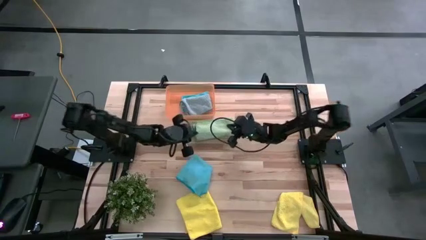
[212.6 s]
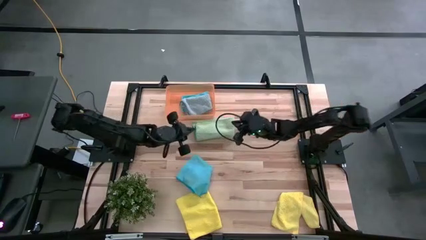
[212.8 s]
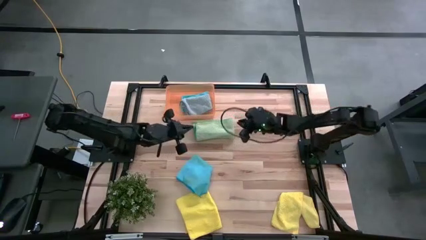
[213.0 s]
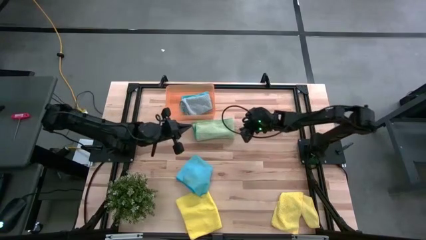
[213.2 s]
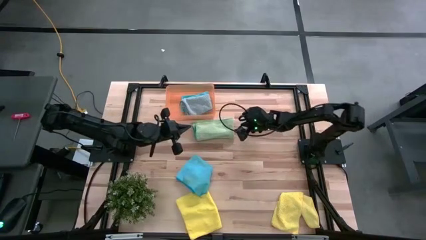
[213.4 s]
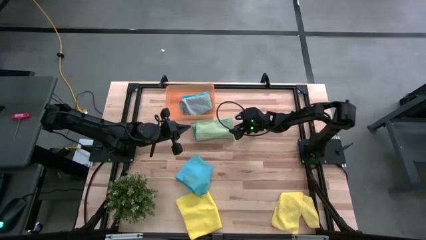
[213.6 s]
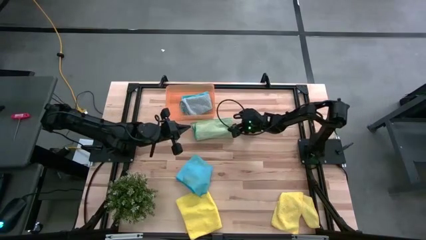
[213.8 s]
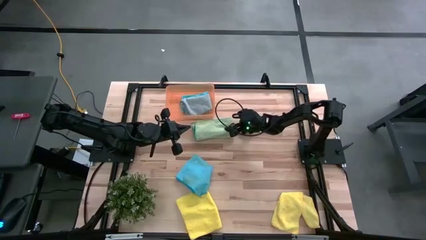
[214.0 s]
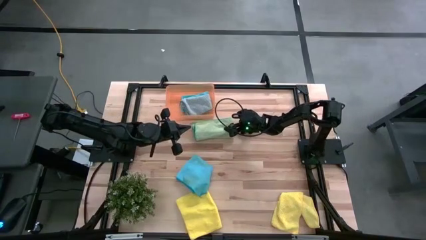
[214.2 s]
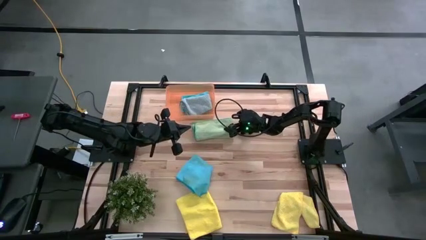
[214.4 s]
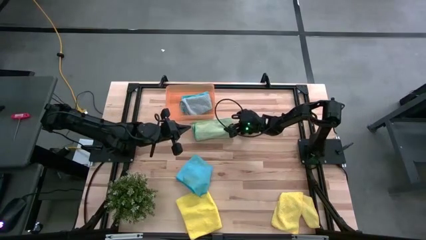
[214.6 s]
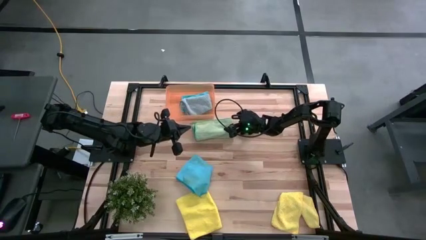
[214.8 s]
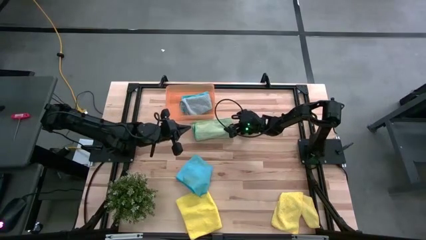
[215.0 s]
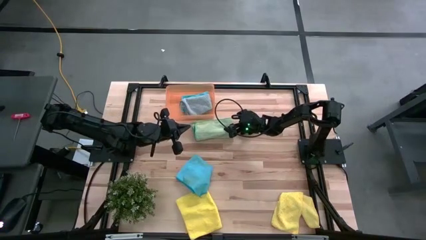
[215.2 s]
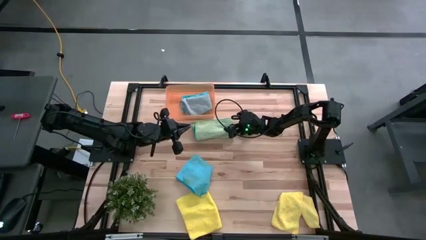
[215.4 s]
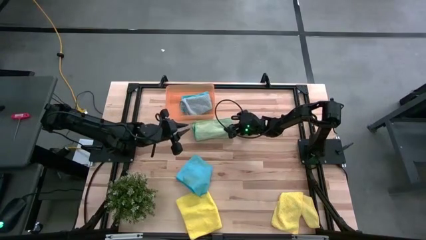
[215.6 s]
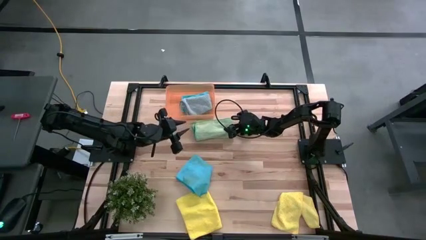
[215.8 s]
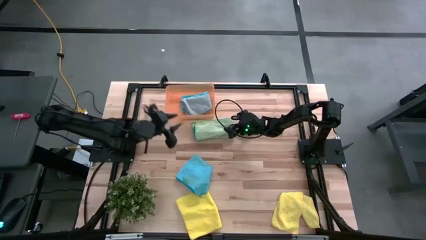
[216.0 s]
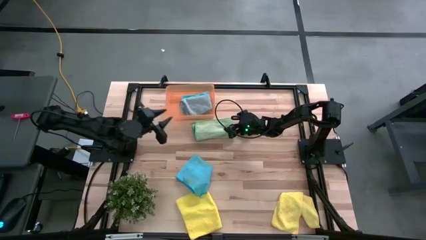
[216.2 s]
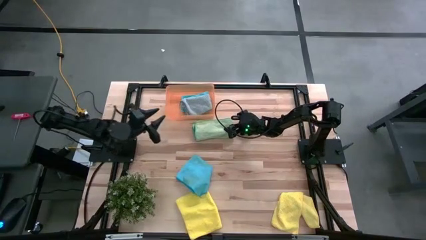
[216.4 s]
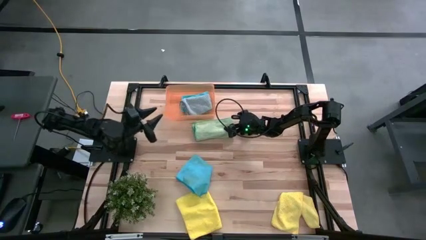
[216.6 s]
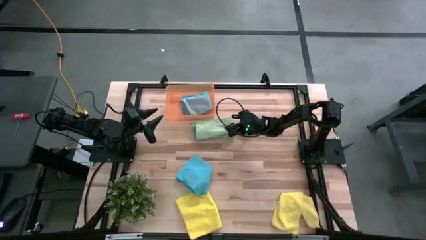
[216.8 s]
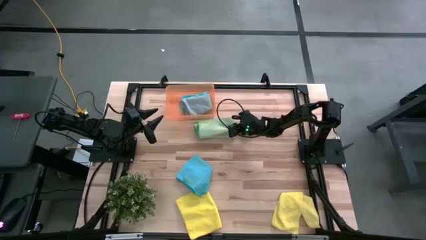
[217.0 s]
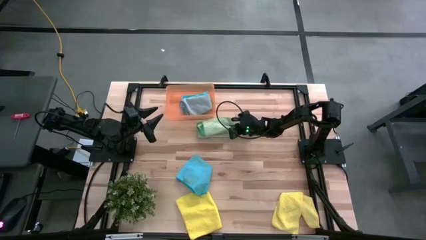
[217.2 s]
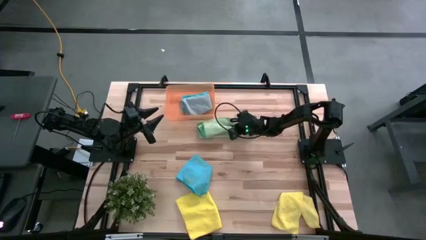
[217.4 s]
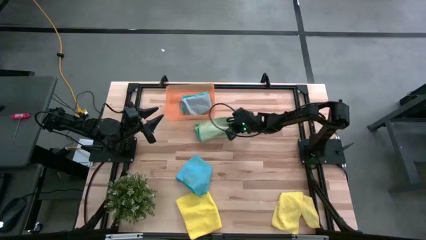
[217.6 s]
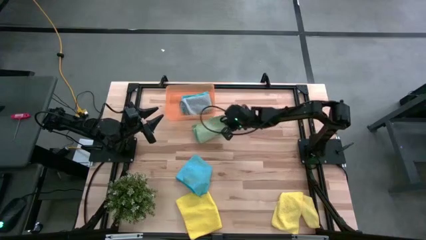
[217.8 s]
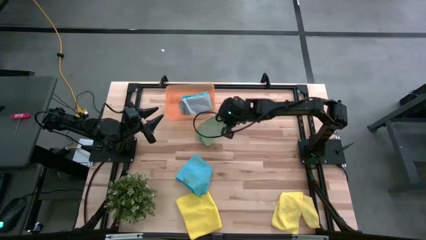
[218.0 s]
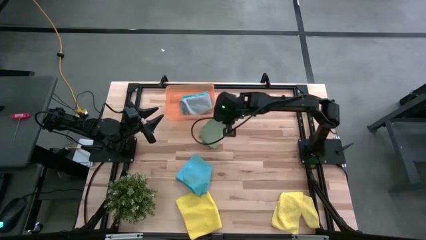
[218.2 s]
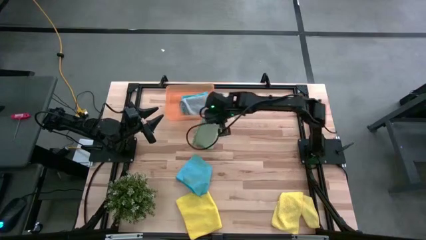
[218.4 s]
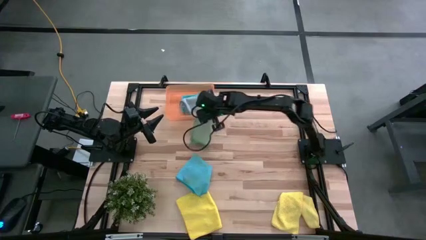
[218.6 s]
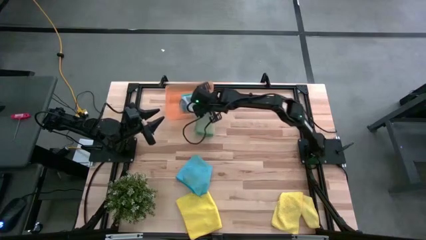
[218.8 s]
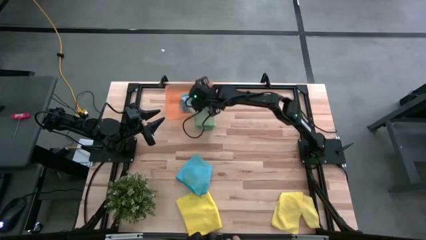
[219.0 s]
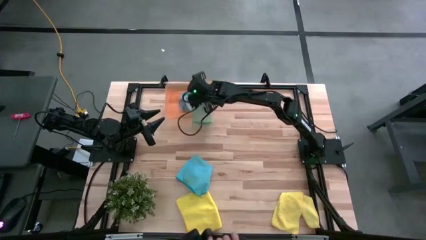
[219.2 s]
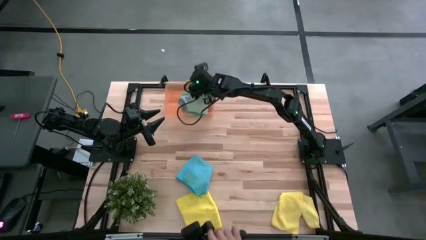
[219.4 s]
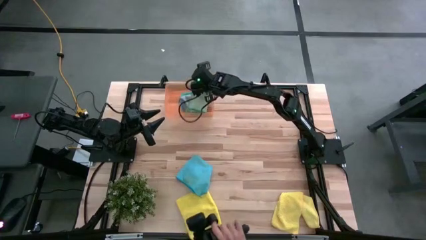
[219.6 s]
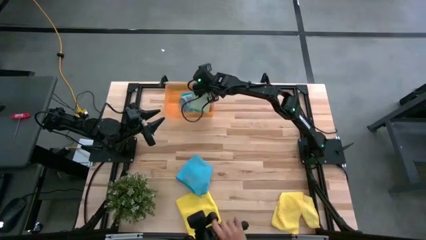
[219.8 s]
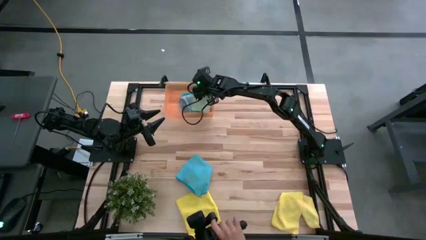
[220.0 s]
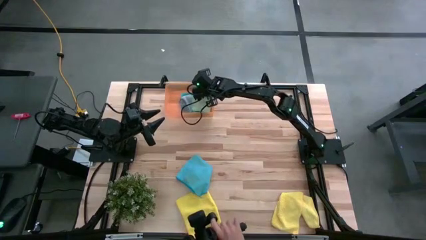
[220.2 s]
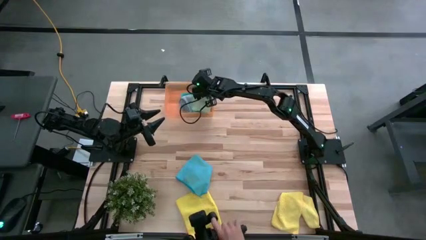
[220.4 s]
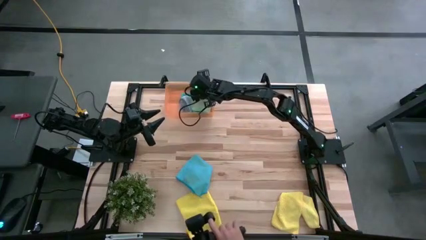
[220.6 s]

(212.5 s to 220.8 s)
Task: Fold microfiber towels
Put the green microfiber cloth into the orange bin

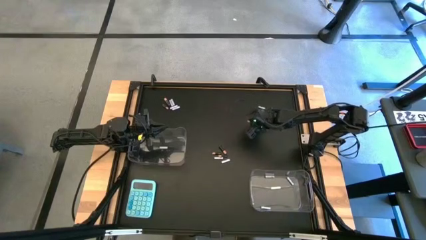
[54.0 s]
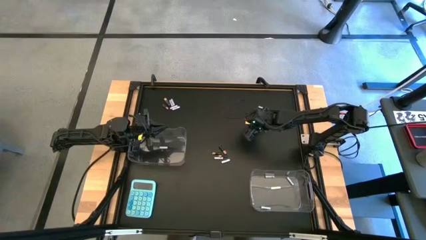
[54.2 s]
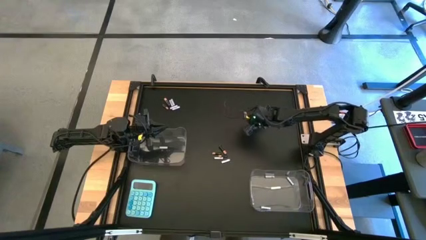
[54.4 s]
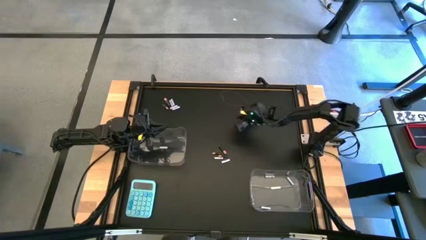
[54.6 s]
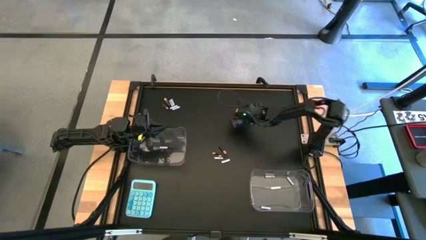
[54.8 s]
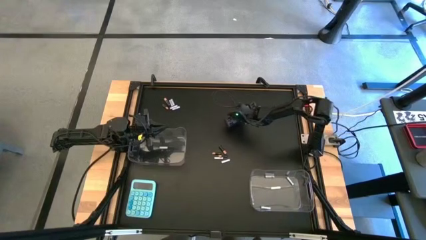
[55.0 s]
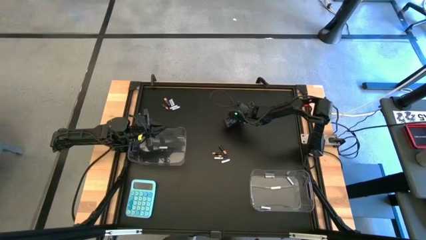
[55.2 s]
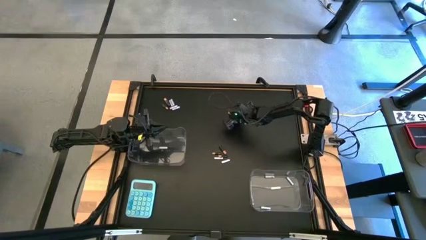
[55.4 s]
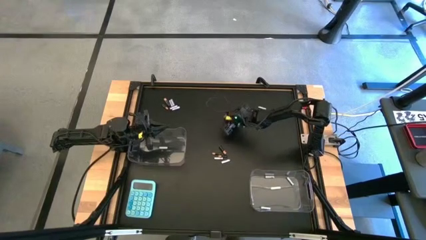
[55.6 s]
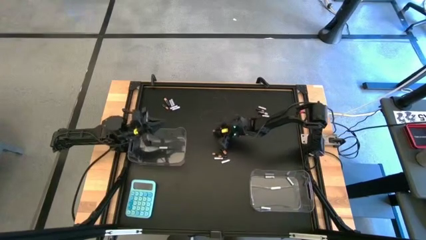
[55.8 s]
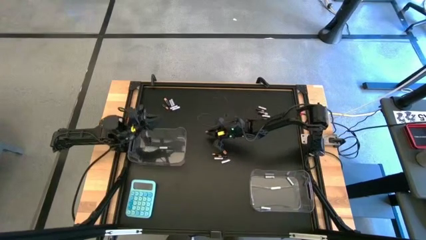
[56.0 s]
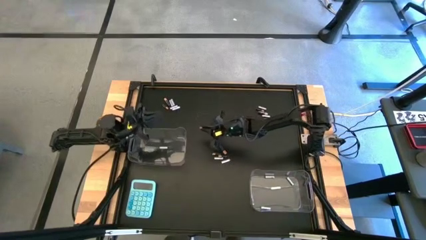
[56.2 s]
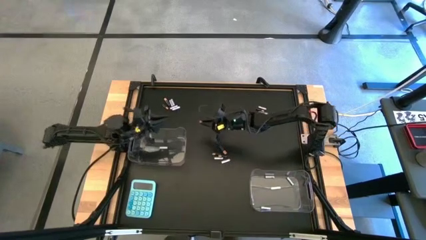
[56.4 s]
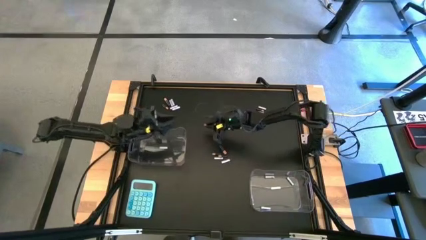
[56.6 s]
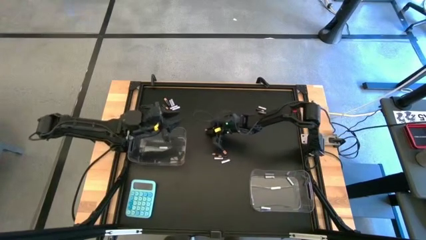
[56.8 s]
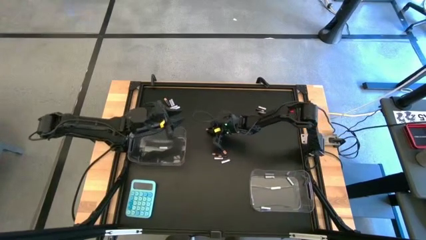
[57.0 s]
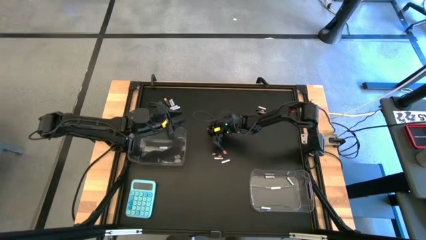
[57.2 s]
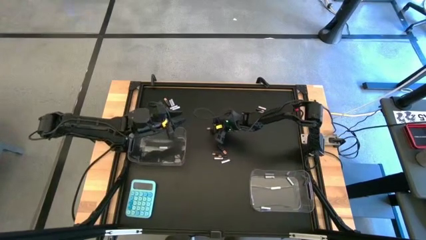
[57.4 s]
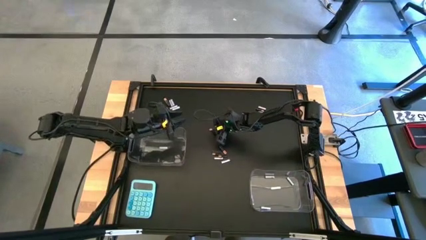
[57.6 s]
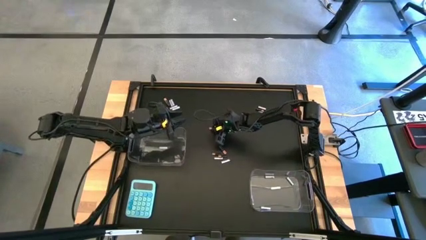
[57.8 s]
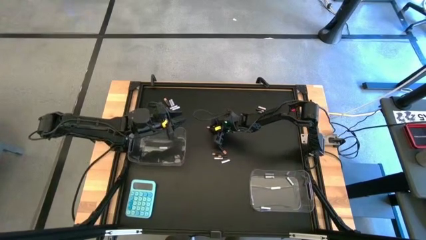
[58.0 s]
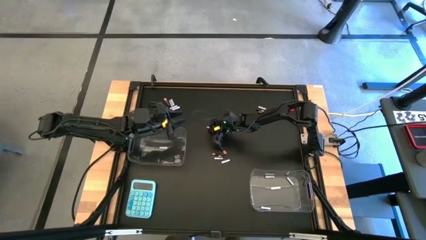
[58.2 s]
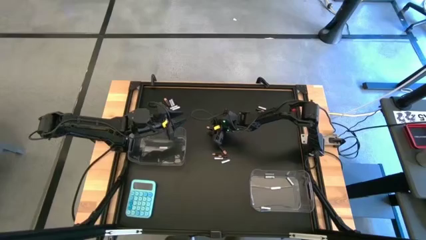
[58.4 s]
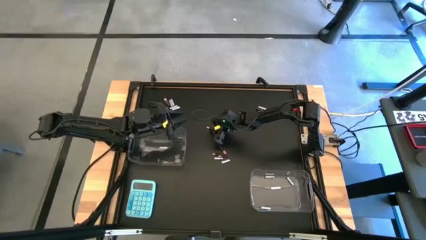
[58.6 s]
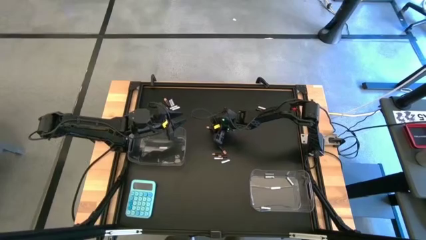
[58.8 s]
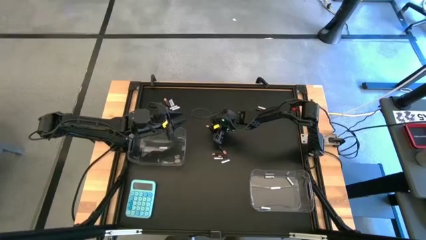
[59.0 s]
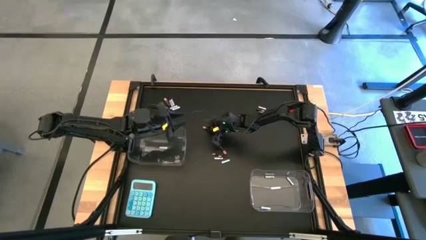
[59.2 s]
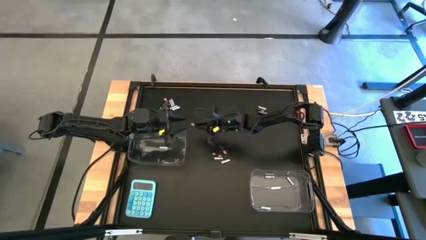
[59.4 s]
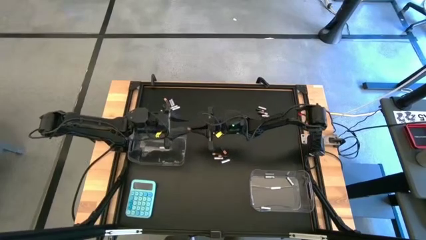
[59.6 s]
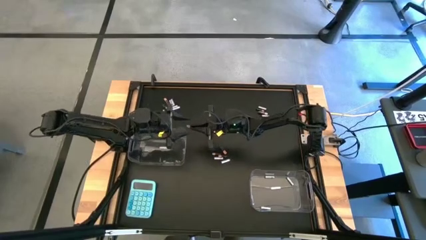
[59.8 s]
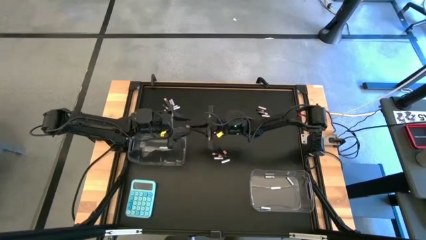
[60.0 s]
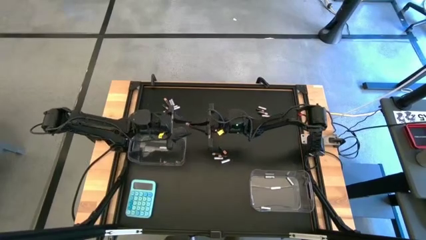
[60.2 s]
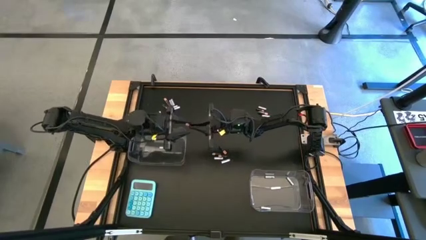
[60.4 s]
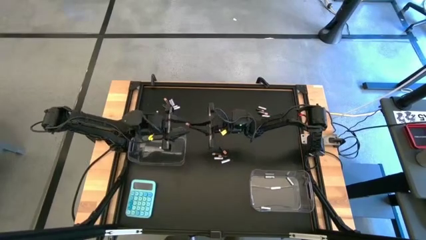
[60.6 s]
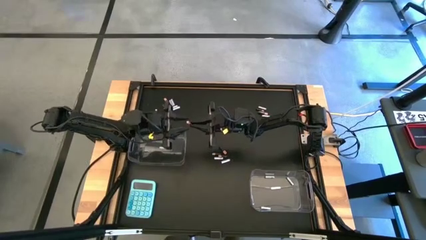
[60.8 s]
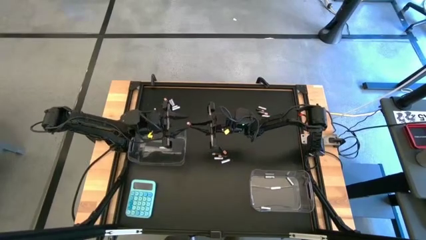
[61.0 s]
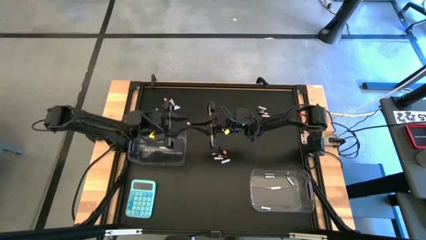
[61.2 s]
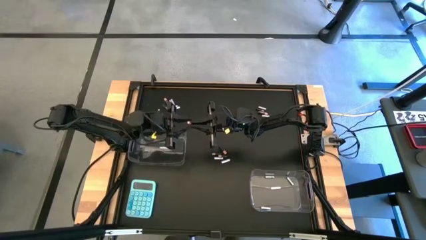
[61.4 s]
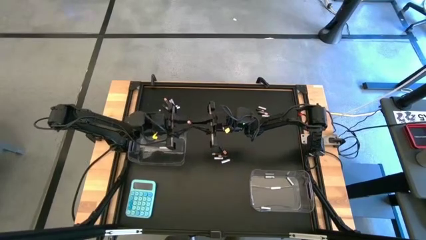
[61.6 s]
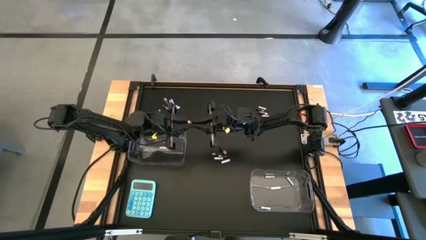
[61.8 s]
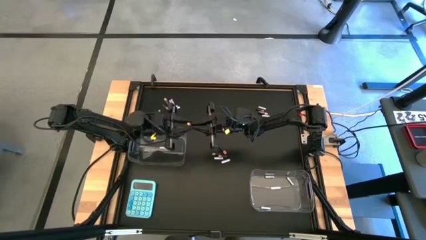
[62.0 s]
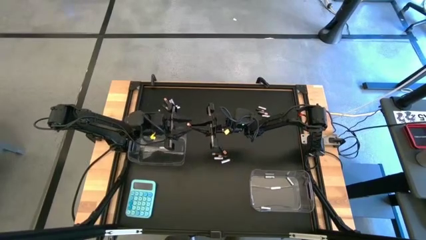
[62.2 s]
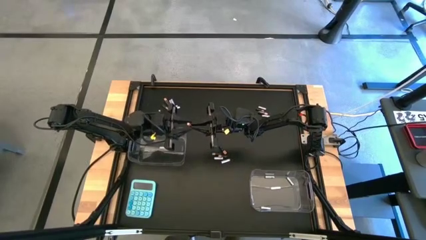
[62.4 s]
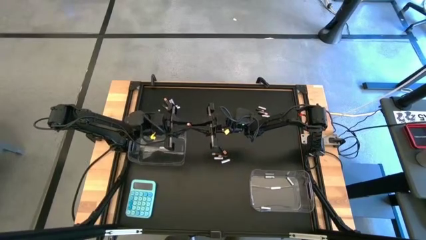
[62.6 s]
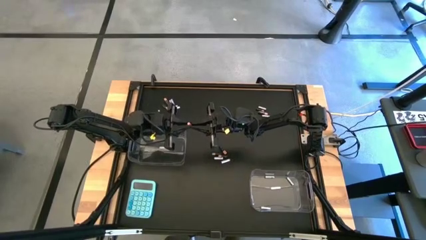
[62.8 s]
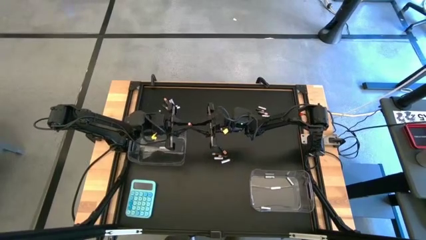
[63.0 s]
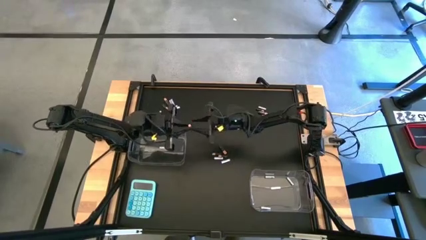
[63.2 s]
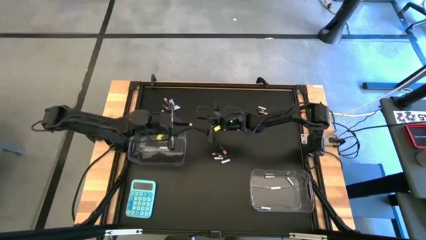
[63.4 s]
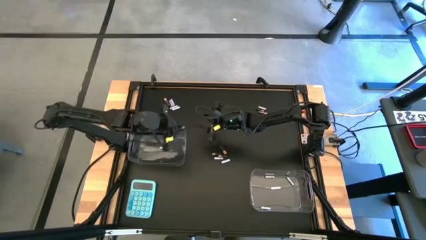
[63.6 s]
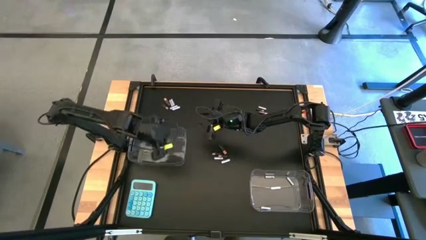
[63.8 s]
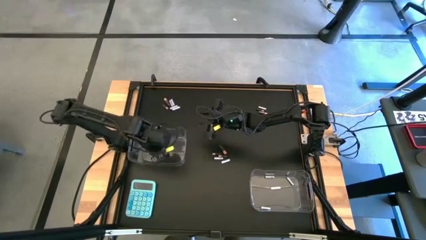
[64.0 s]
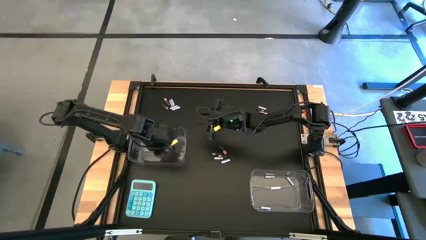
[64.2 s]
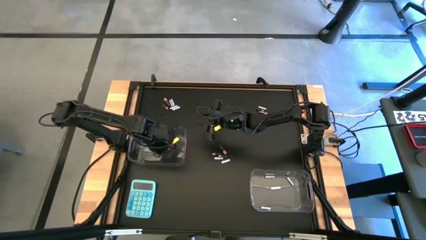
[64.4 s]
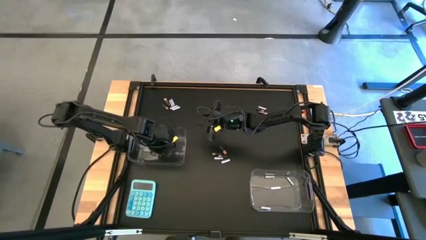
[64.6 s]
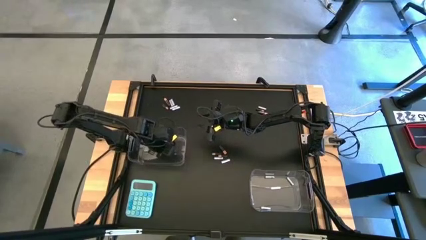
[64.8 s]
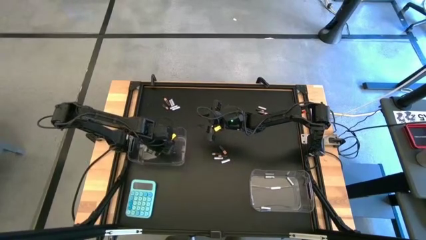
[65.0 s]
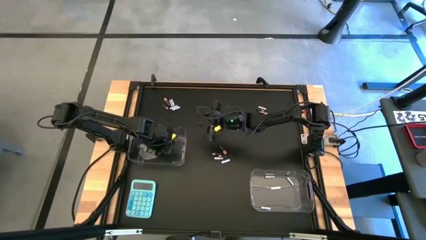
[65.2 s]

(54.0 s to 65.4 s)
Task: Sort batteries
Put the black battery into the left transparent bin
